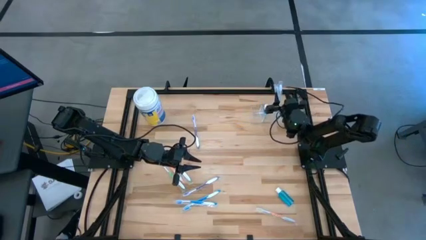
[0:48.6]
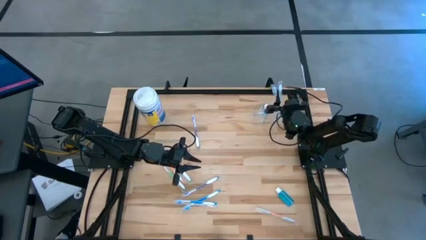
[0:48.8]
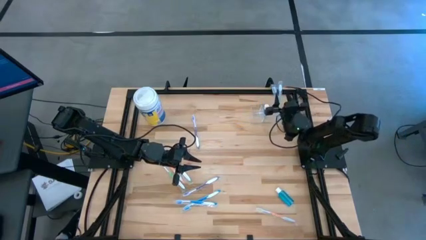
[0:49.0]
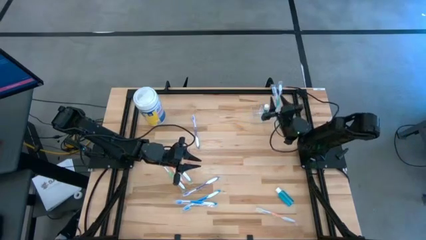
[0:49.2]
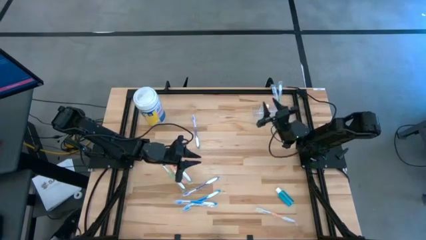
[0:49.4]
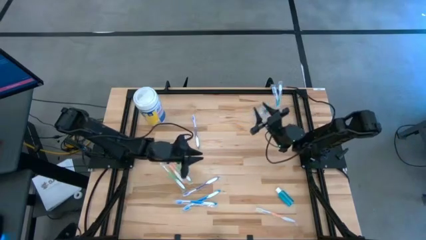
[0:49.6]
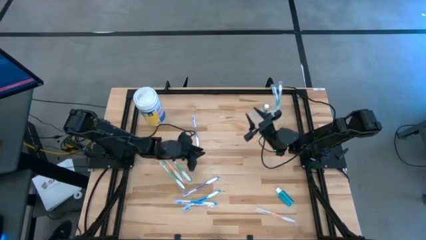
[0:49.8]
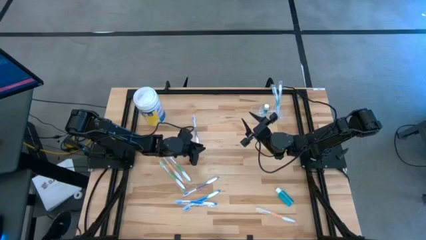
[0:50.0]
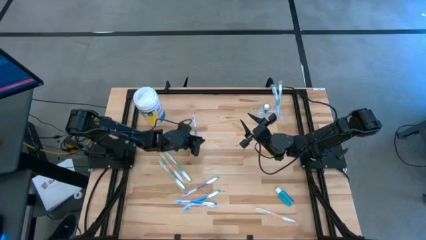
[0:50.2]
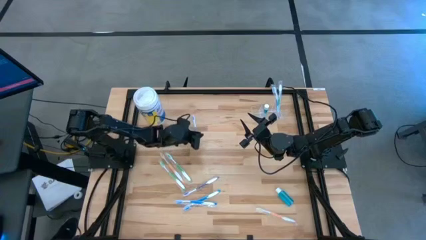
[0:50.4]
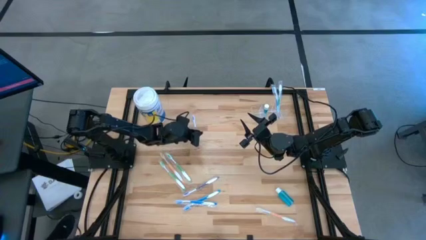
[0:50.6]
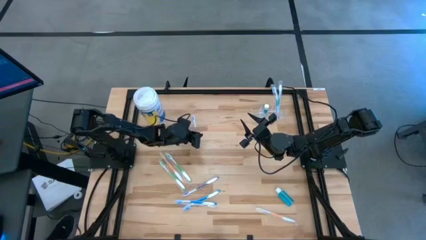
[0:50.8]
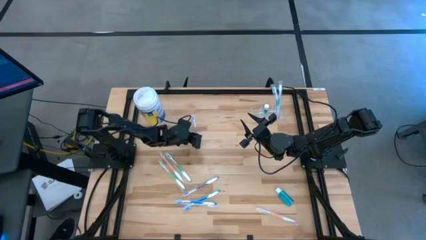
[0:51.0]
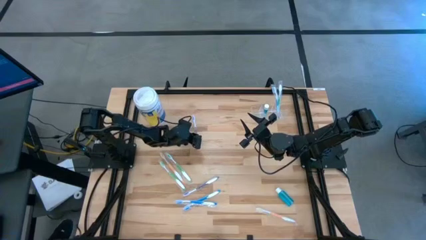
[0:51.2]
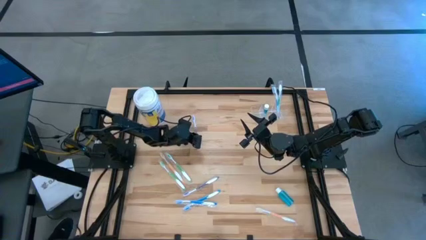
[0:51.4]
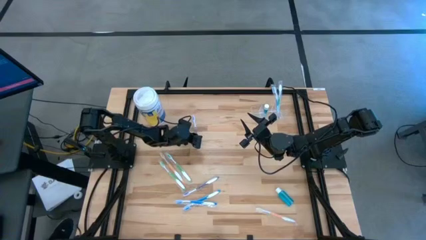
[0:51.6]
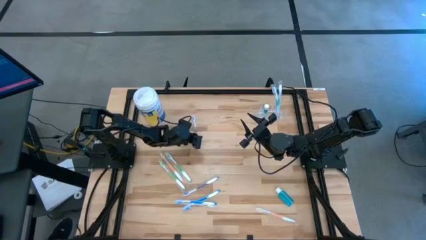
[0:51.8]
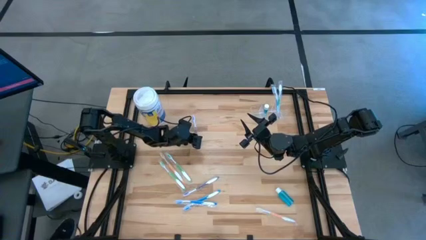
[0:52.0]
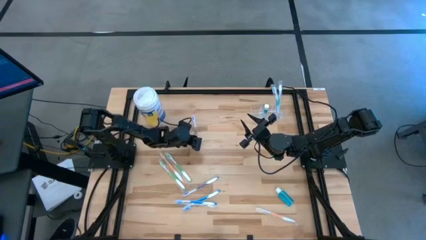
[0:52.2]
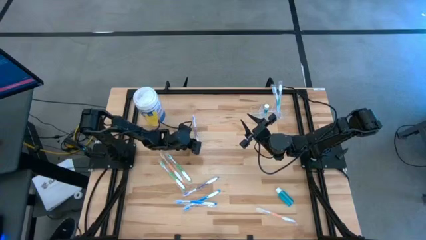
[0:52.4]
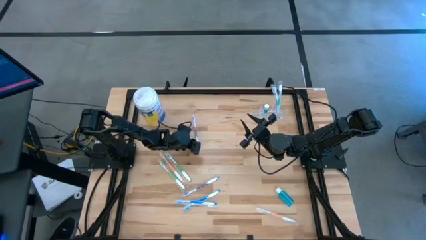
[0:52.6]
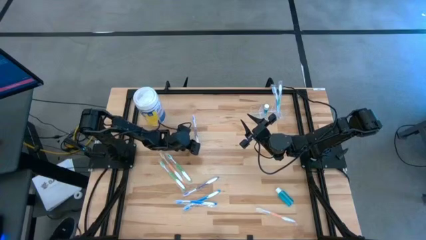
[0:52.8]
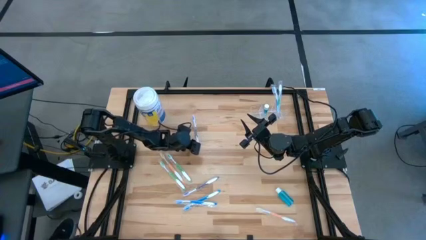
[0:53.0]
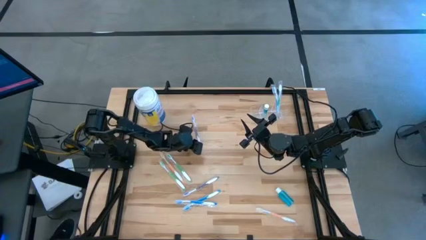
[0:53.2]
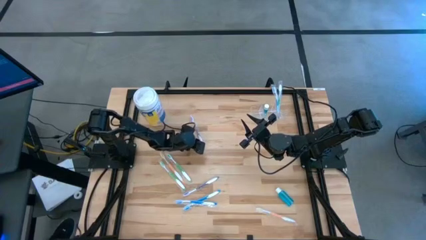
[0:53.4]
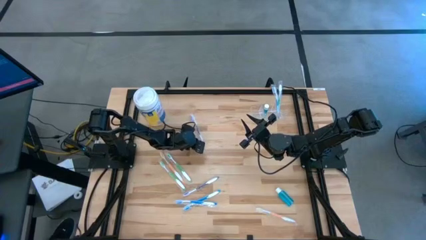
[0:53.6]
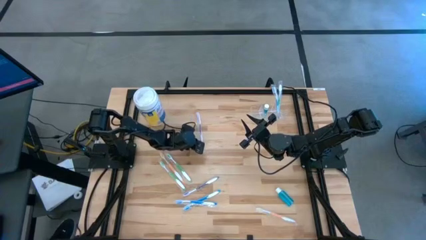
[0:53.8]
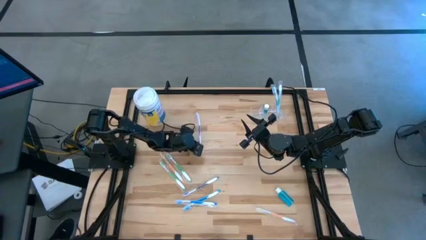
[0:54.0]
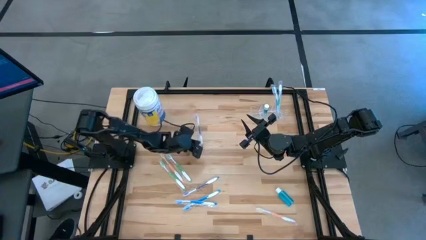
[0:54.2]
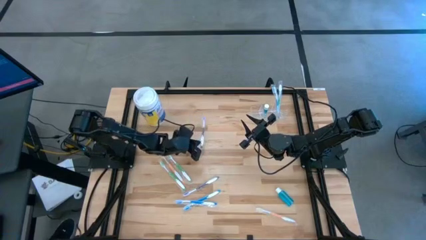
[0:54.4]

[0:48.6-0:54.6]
Task: Pick & Place toothbrushing station
Put the top purple toothbrush into the right transparent organizer

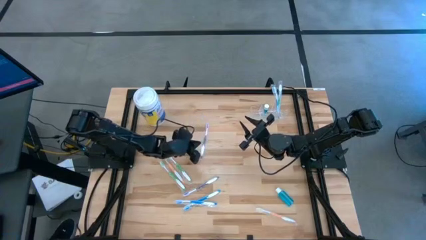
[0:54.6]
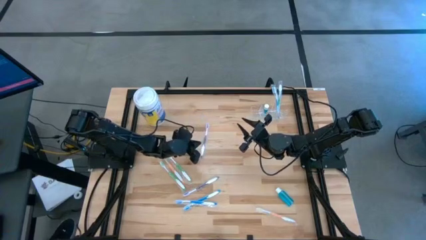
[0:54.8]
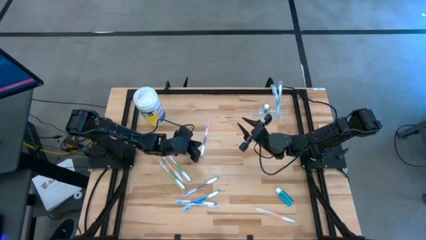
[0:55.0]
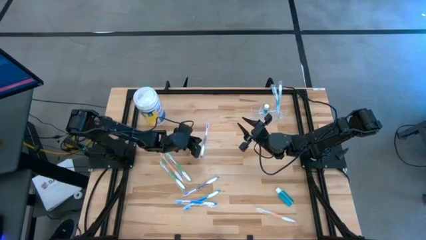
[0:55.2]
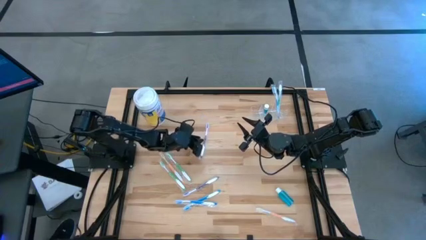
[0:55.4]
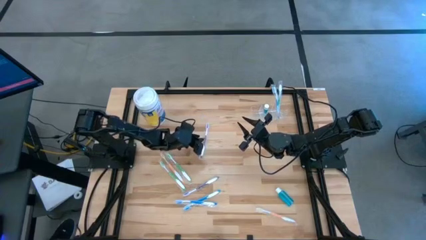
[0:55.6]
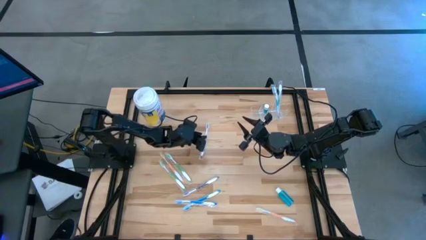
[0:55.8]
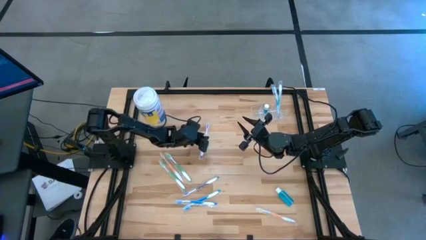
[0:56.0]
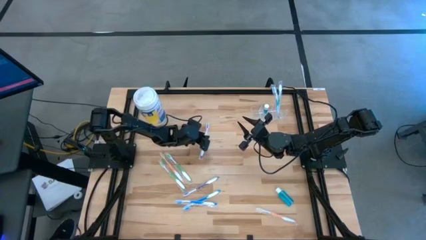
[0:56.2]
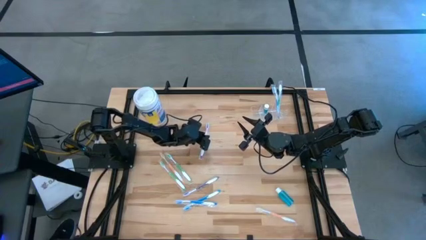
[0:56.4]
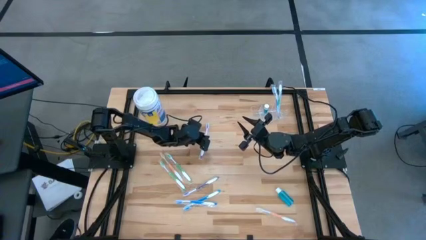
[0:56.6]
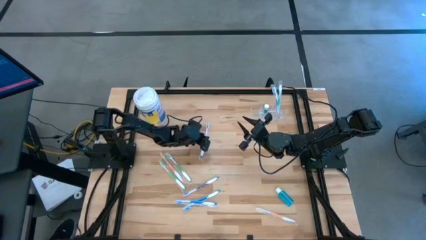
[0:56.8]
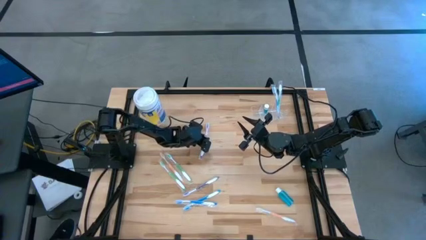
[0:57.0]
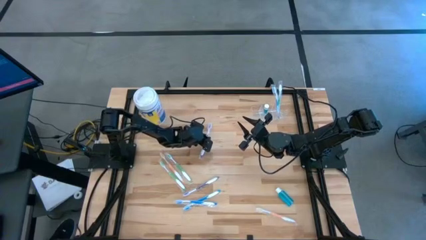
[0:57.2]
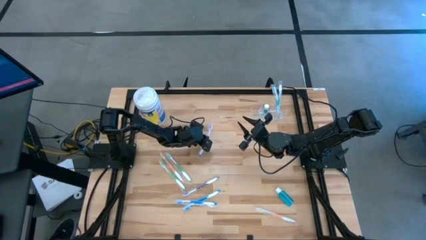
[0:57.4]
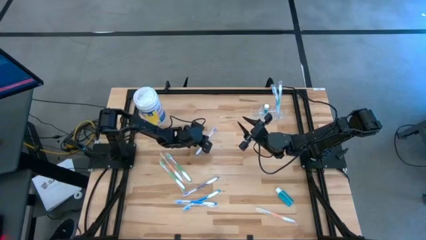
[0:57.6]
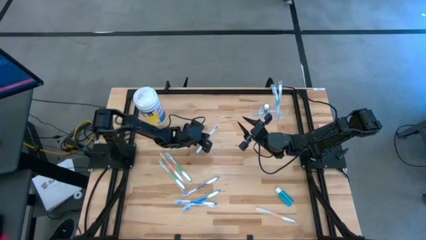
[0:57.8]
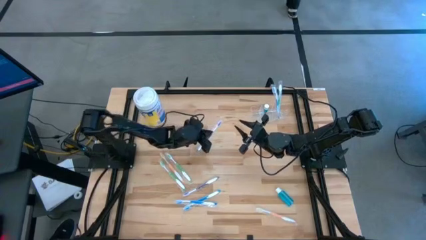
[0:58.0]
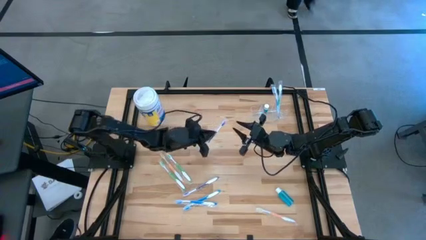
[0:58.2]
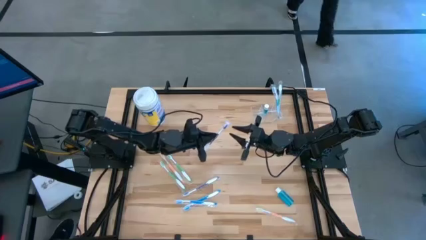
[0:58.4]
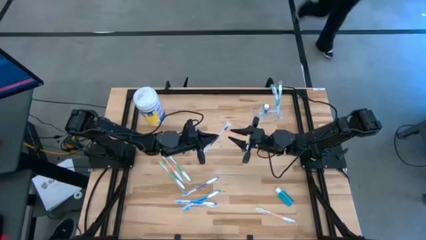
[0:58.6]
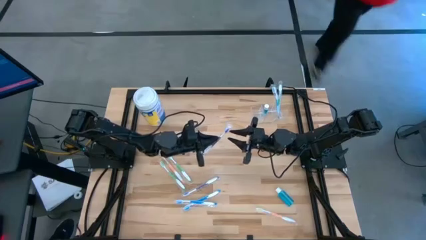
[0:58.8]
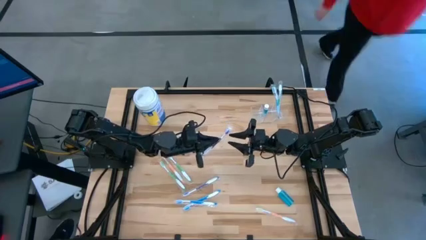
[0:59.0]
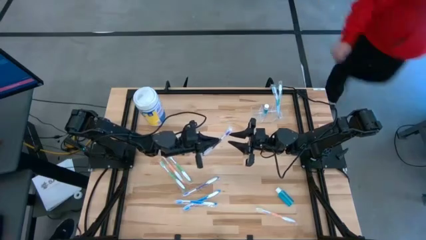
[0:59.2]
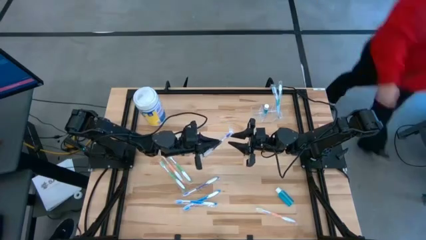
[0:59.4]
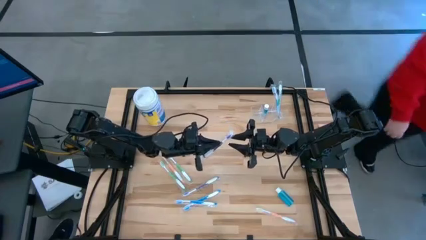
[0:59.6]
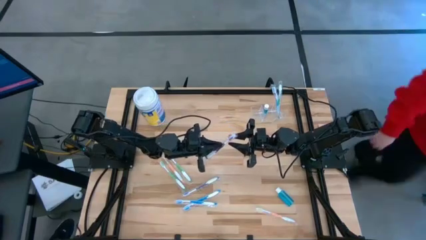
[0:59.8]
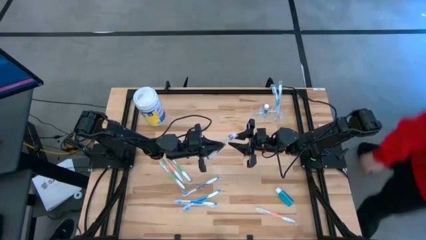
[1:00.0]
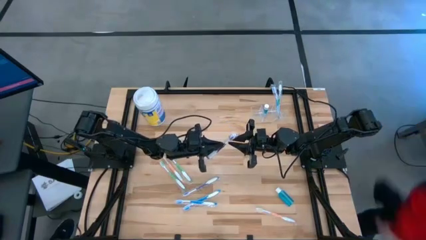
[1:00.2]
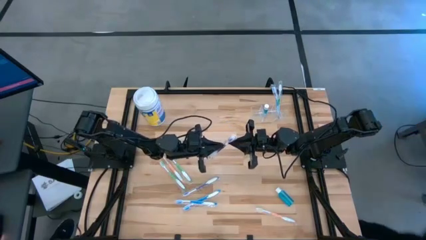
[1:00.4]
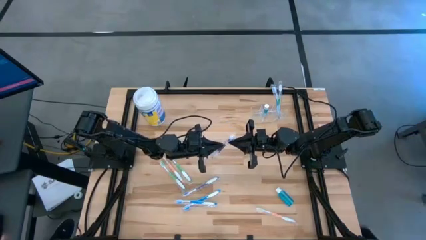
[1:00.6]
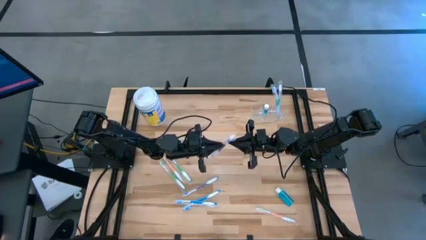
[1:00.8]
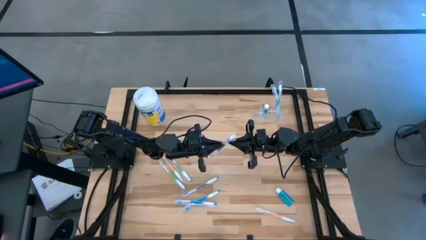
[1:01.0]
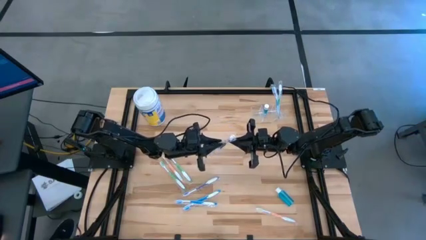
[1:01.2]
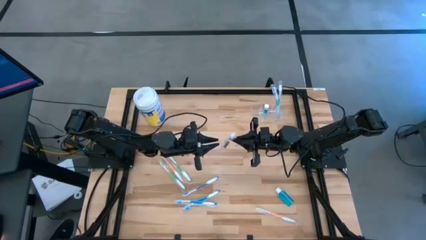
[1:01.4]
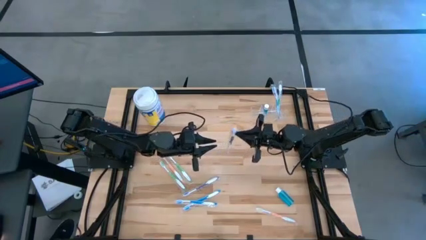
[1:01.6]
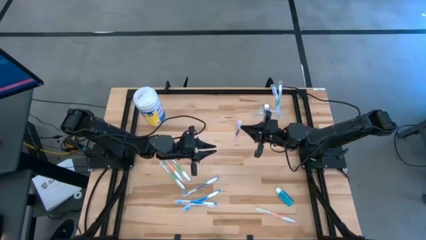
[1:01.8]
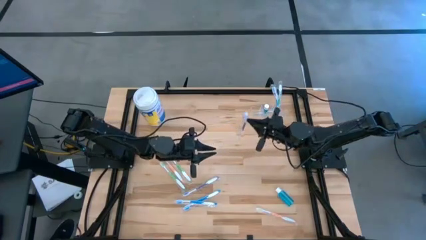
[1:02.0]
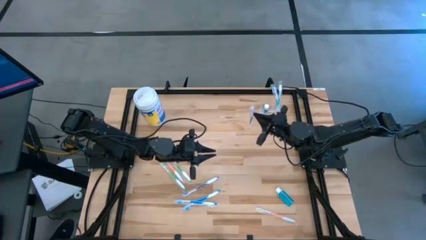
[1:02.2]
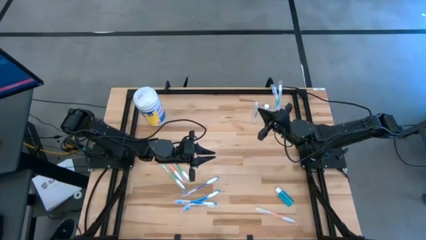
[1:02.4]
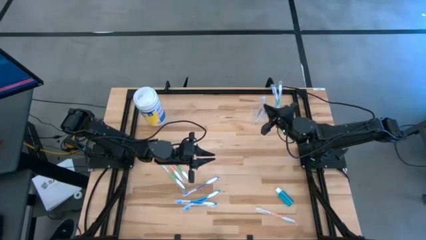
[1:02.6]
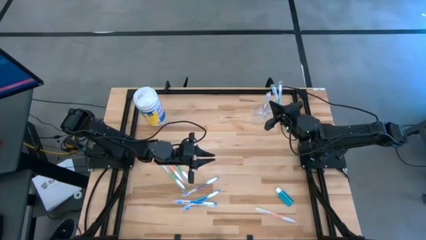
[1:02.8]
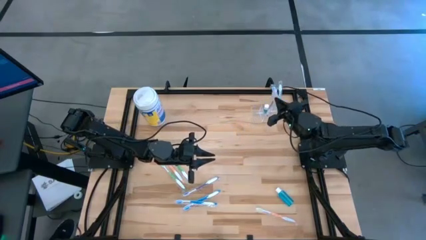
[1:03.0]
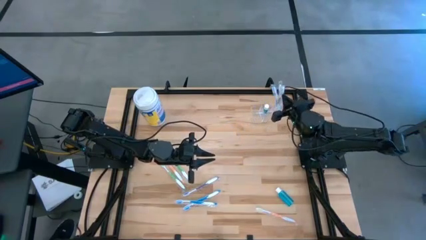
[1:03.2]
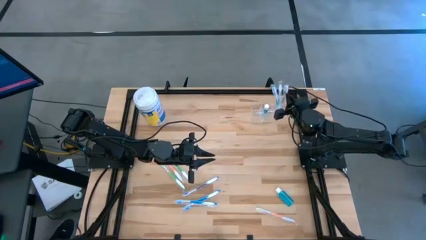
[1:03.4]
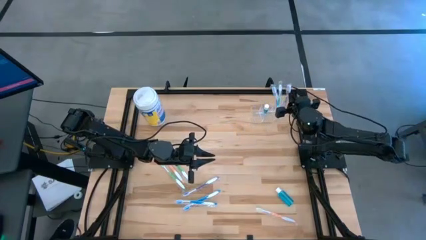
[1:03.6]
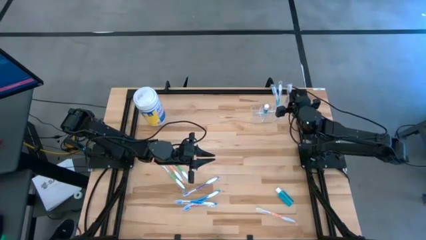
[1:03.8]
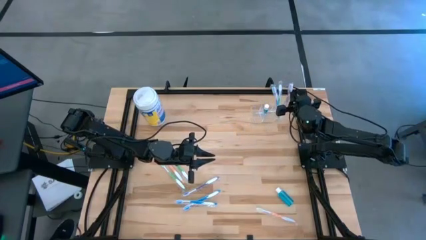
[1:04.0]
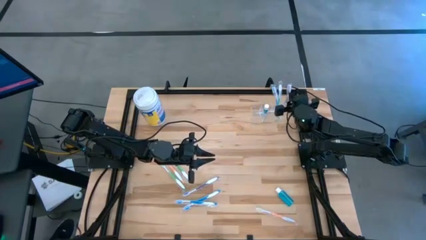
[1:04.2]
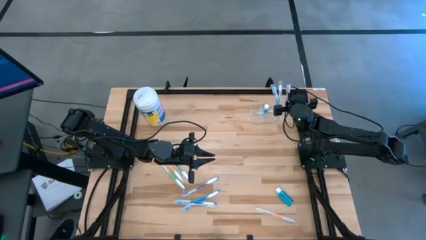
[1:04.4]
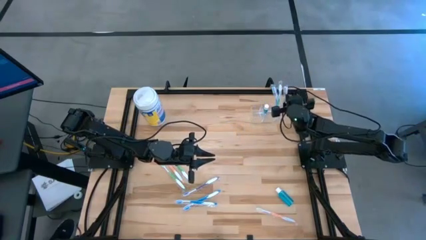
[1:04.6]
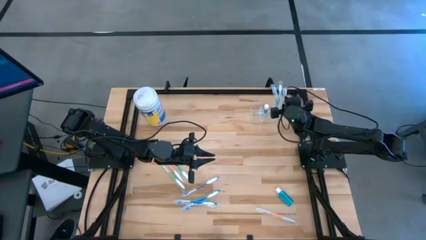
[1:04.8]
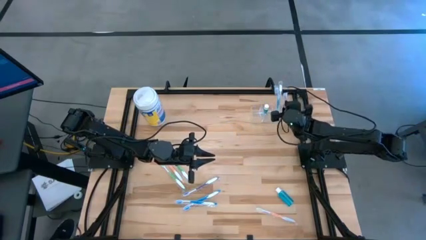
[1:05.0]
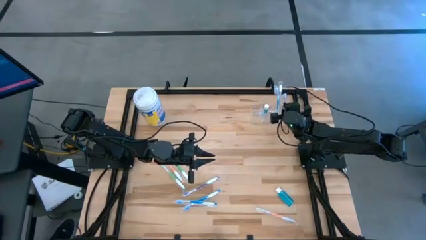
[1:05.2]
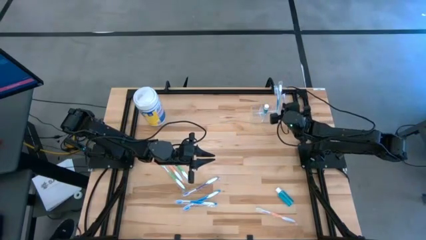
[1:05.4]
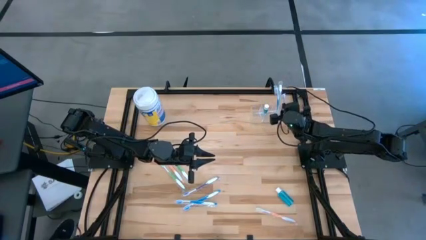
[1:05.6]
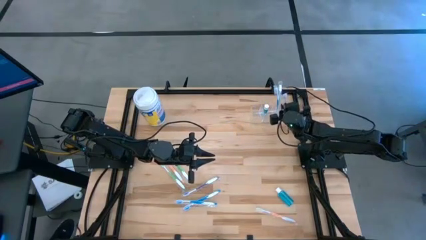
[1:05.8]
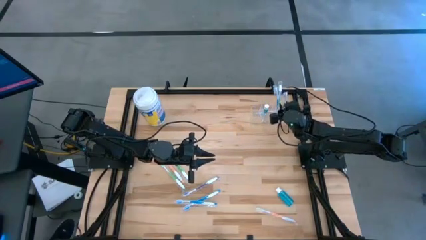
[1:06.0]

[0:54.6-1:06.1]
Put the top purple toothbrush into the right transparent organizer
